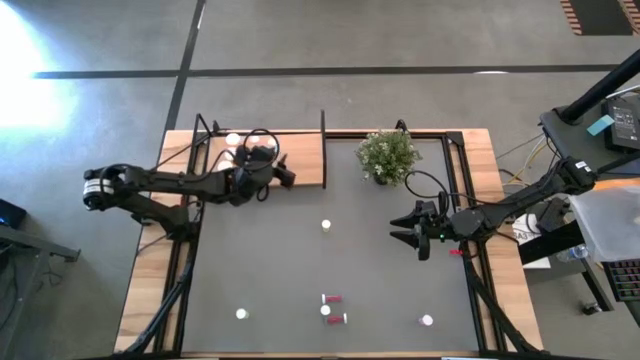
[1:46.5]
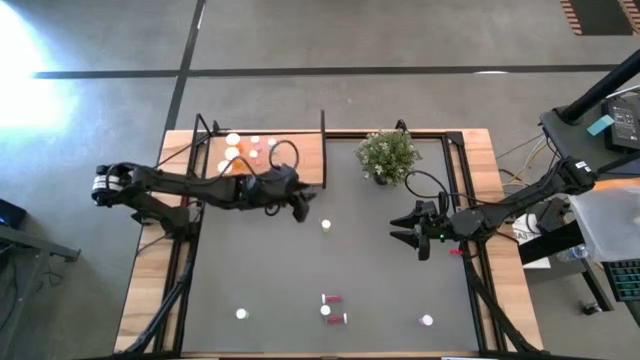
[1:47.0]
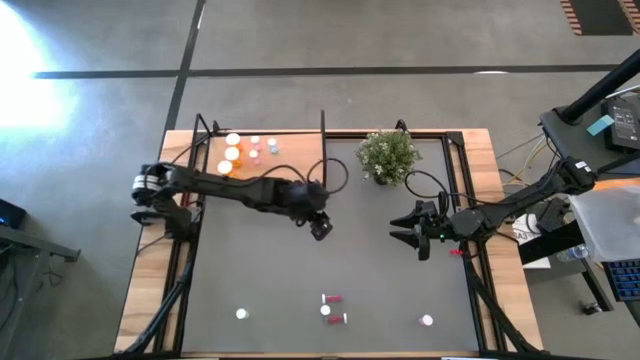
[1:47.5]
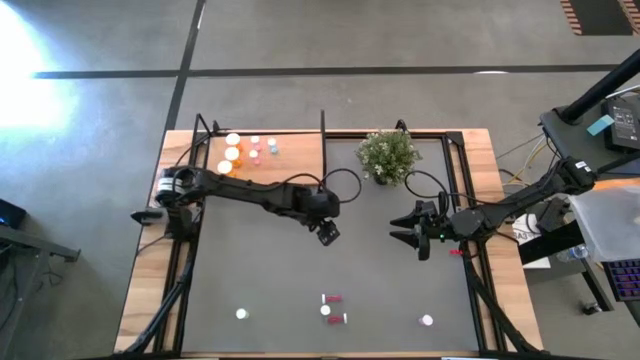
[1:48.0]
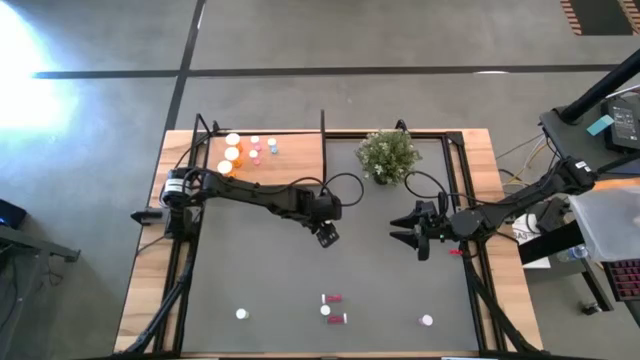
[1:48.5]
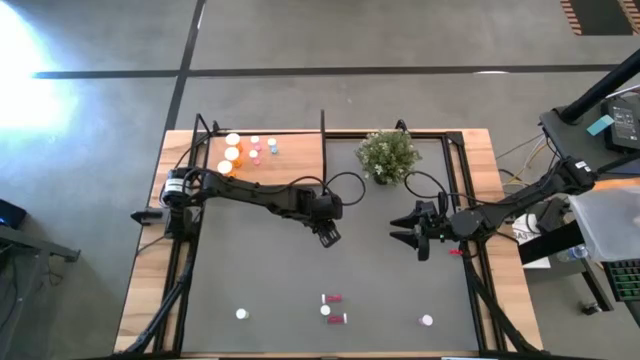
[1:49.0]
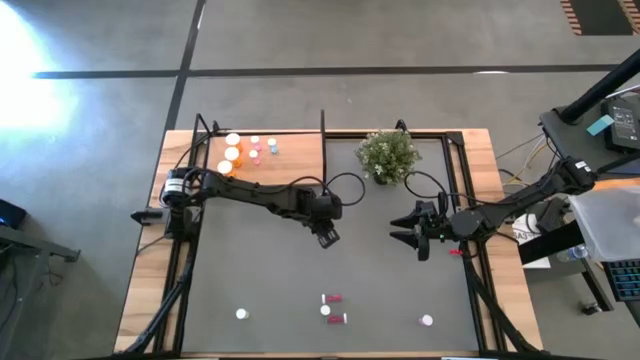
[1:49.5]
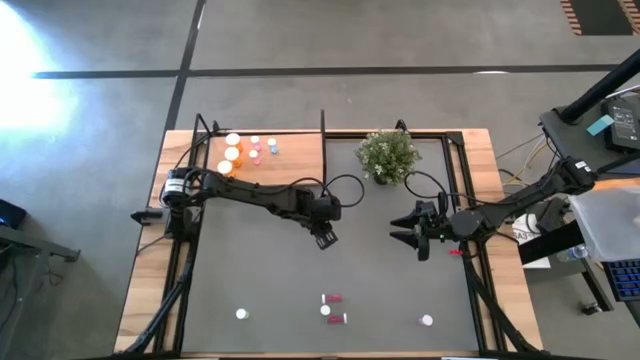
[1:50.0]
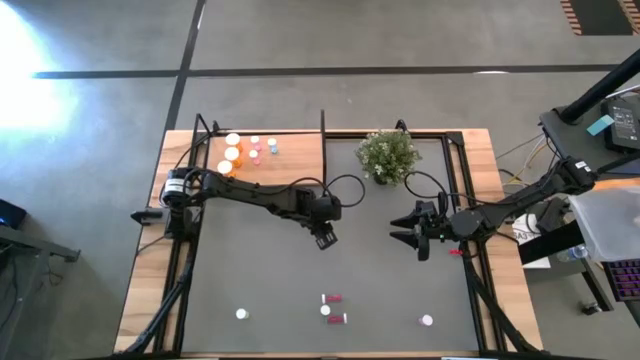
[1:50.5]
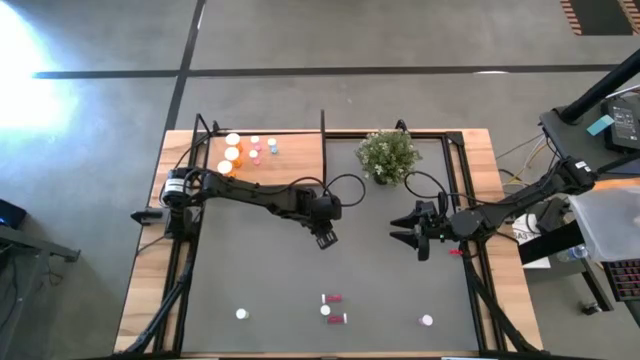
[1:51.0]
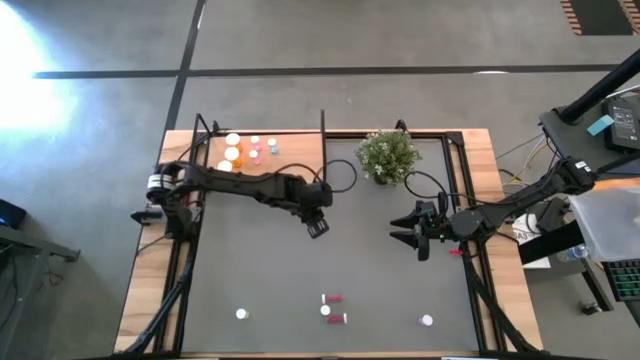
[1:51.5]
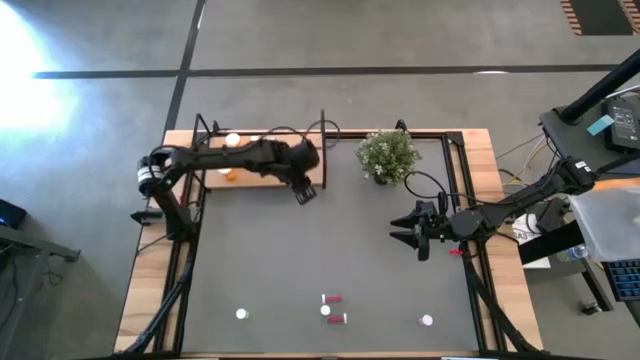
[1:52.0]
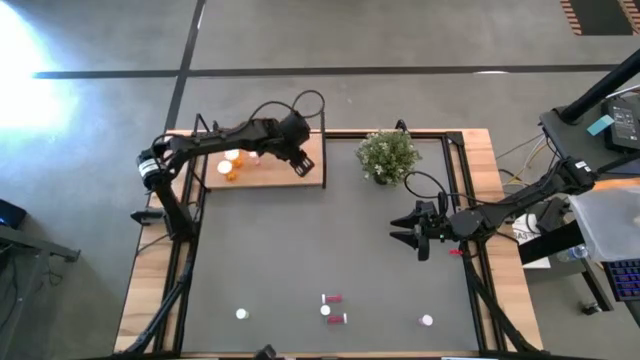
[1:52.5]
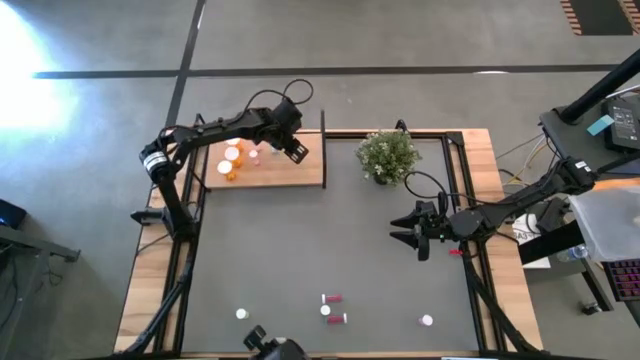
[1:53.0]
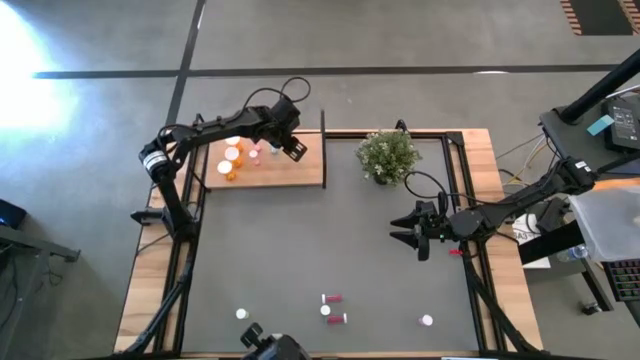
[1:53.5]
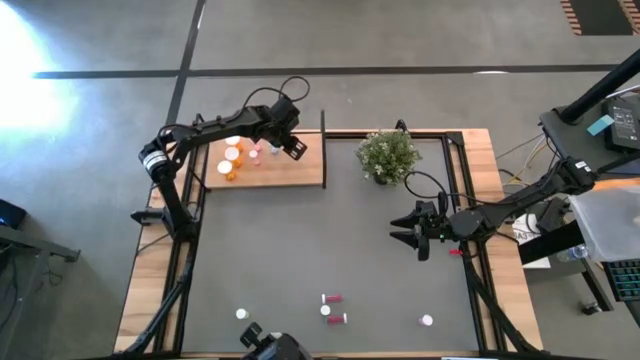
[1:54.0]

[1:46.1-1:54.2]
Task: Pick and place medicine bottles onto shelf by color
Put the top small yellow pill bottle on the shelf aligned with the other small yellow pill bottle

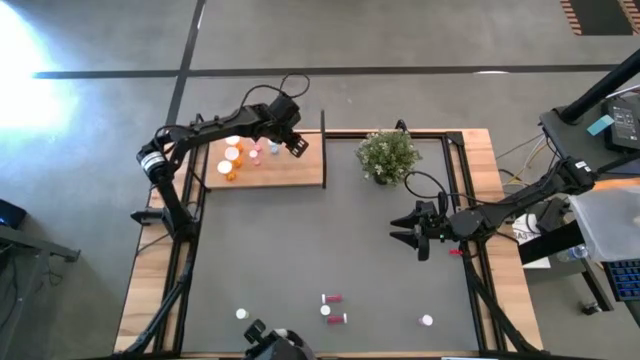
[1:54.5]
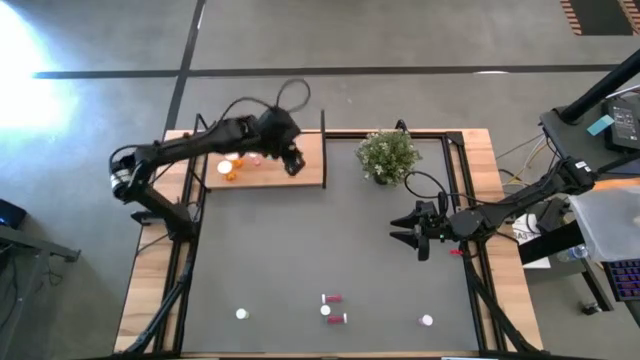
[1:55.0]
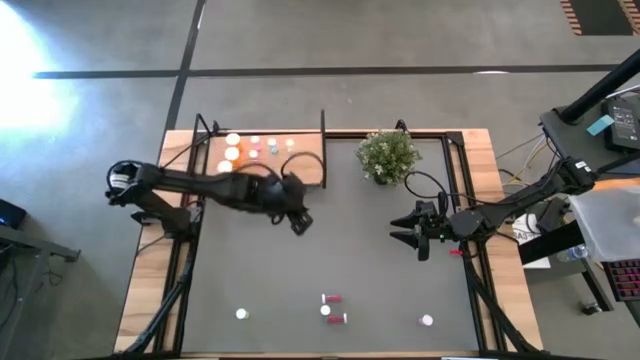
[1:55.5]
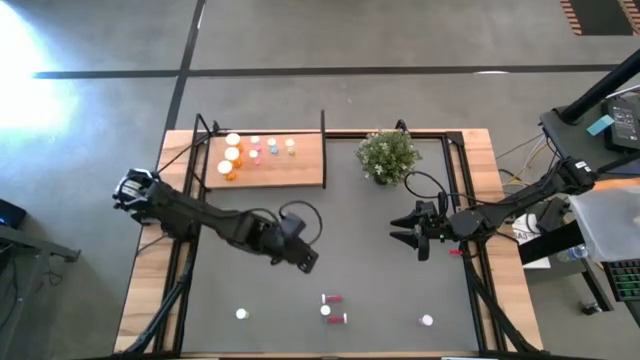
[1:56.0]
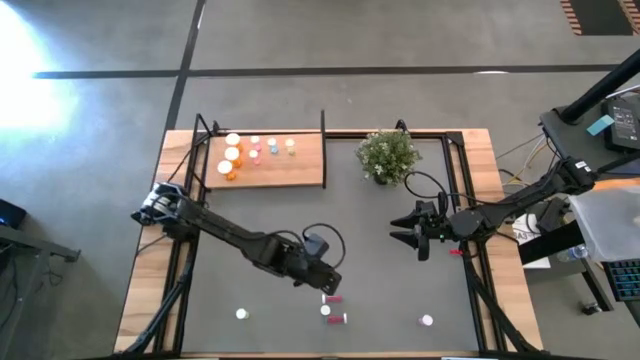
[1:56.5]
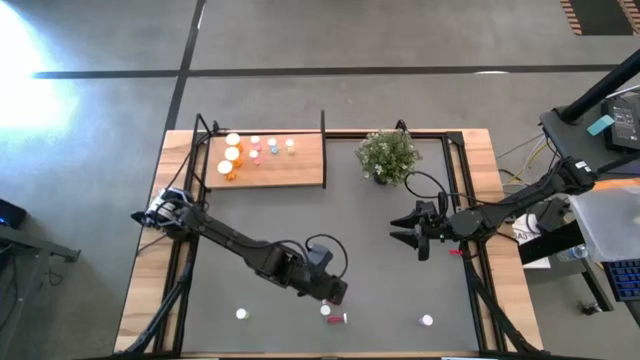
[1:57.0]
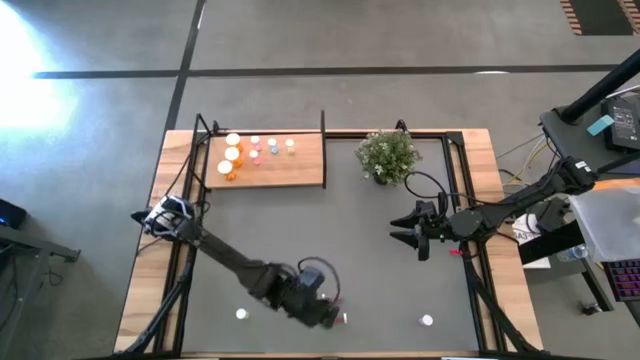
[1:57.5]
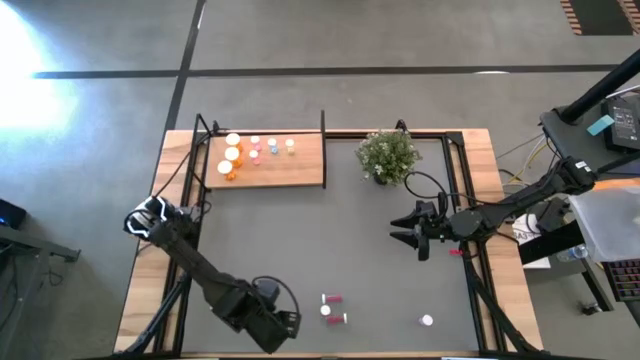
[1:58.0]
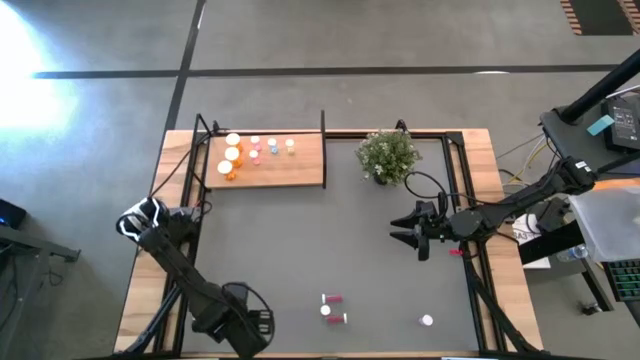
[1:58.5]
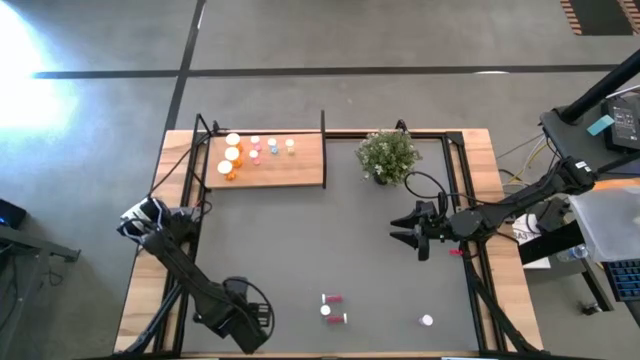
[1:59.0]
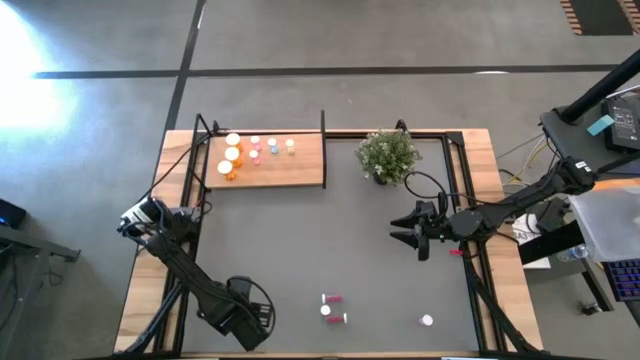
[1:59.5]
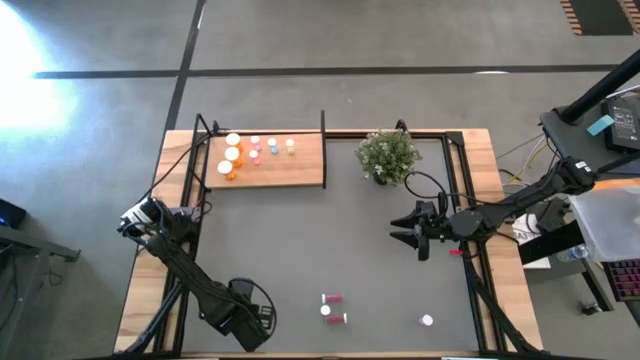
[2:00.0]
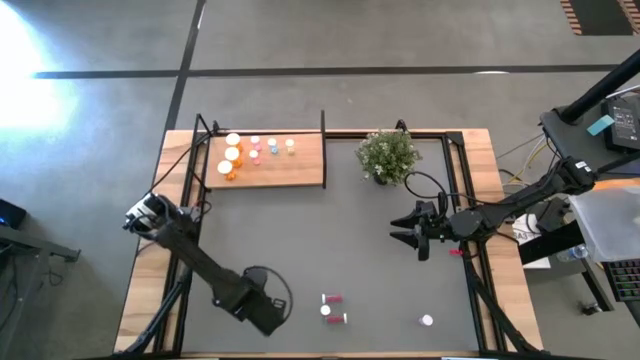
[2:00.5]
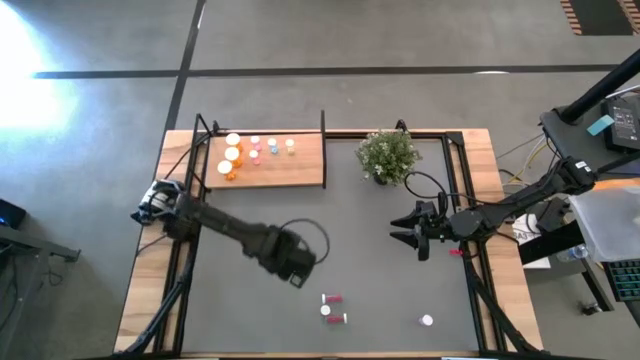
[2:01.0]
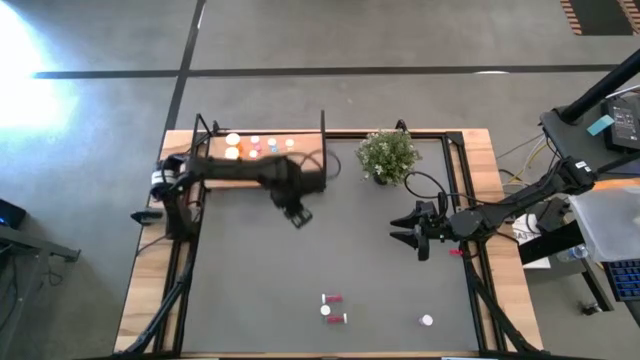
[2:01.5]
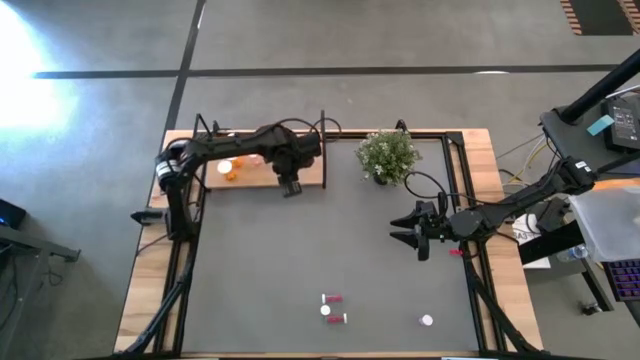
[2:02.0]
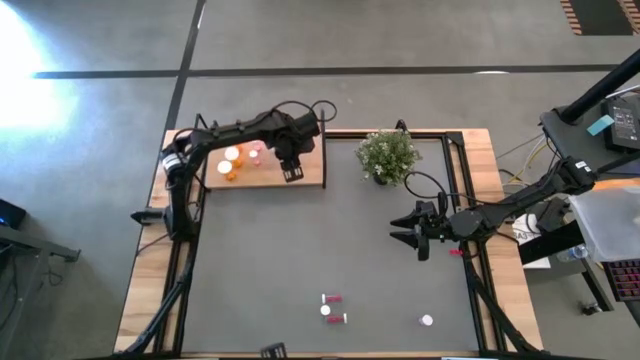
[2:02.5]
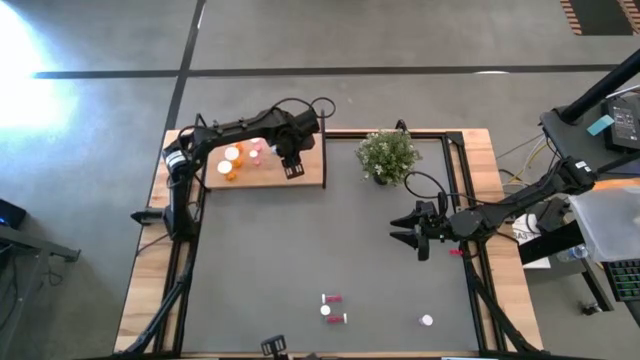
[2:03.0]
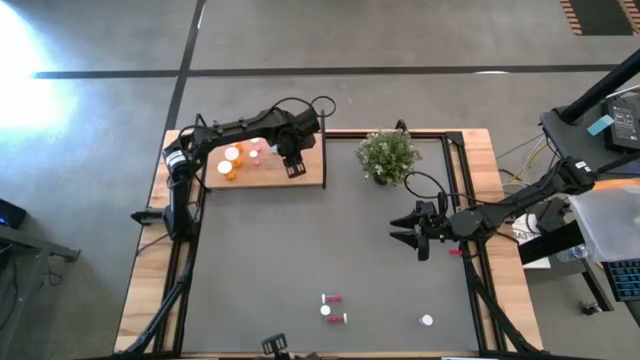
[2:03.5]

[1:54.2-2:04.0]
Put the left small yellow pill bottle on the shelf aligned with the other small yellow pill bottle

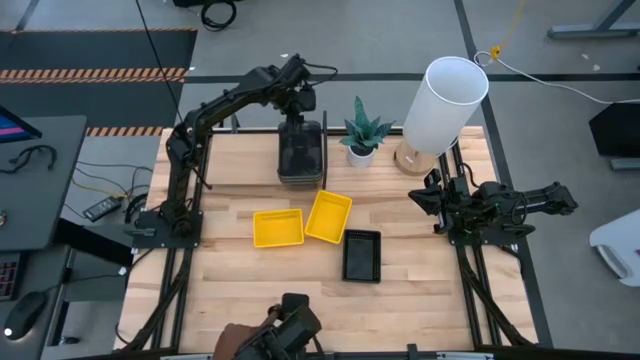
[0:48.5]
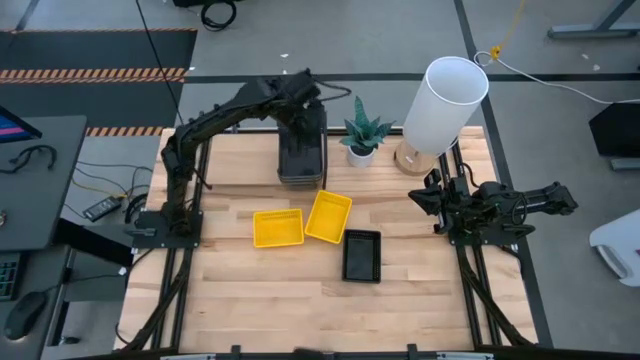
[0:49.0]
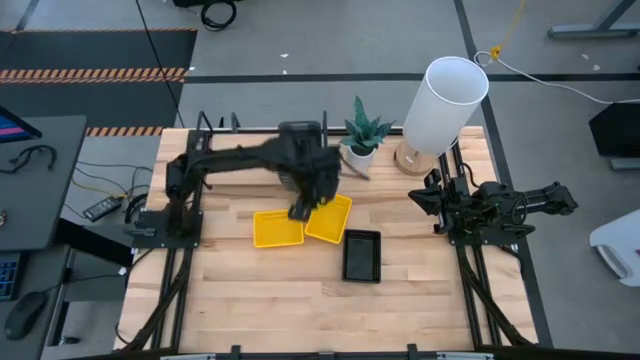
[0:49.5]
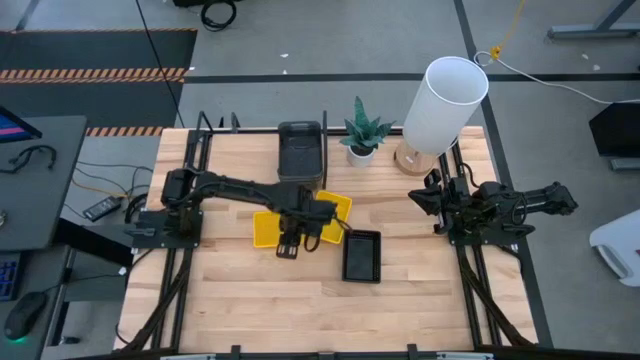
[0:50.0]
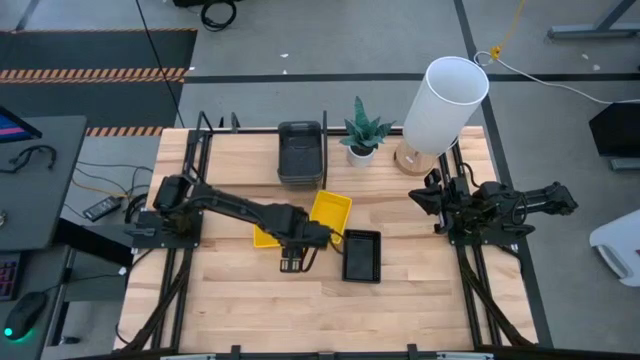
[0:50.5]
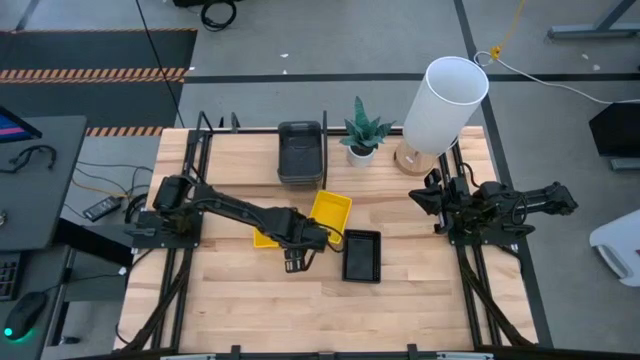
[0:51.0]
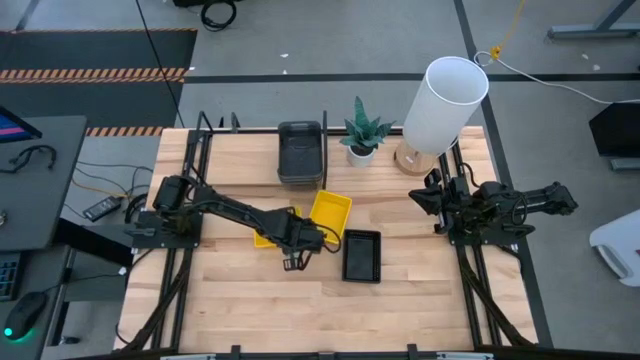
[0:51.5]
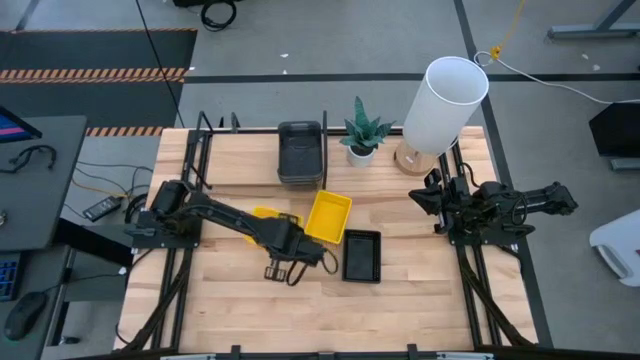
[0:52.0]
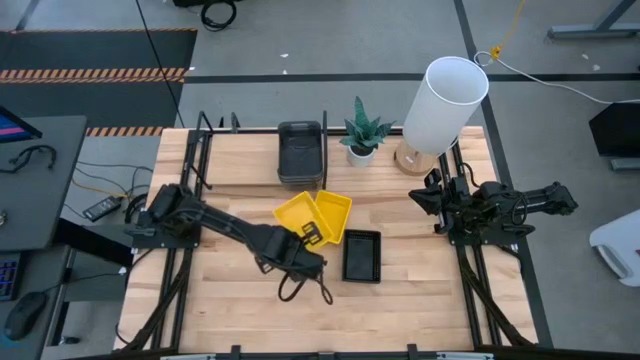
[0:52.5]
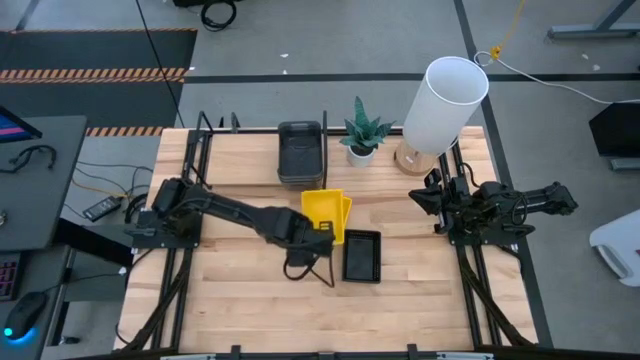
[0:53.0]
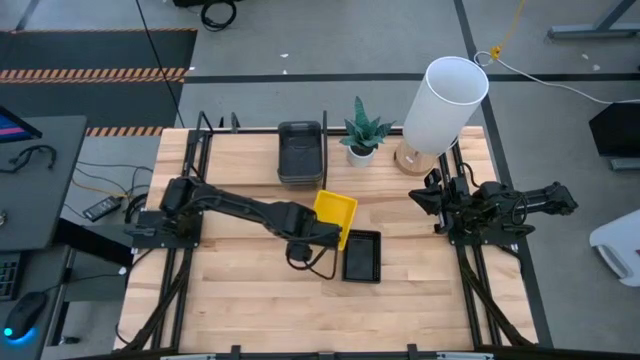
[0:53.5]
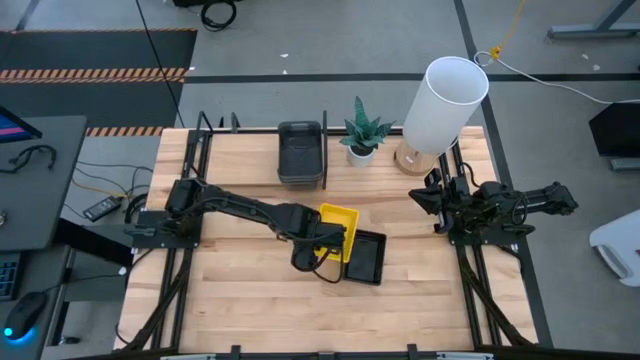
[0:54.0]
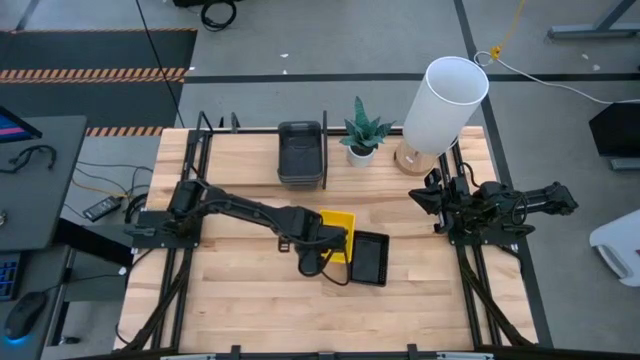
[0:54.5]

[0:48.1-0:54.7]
Task: Stack baskets on shelf by color
Stack the yellow bin on the stacked yellow bins
